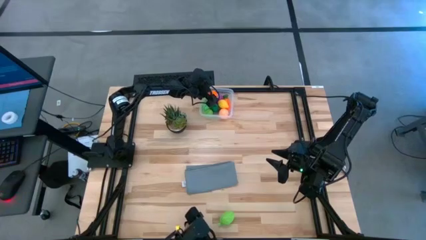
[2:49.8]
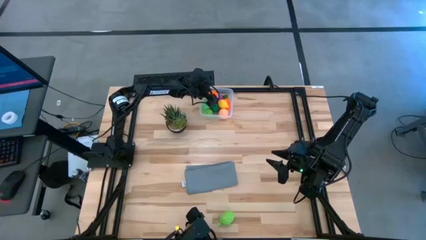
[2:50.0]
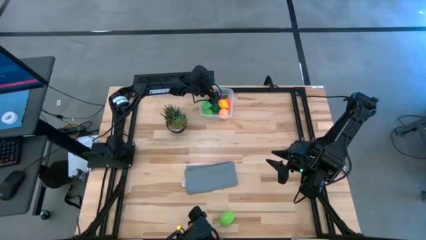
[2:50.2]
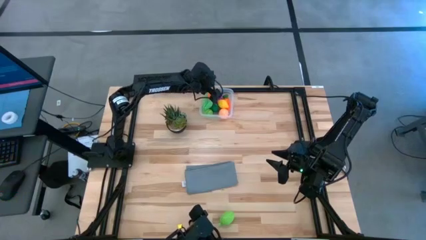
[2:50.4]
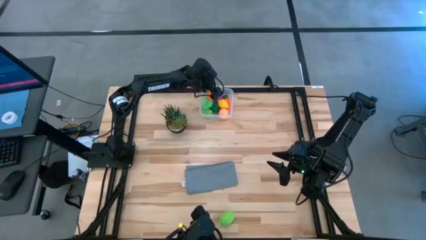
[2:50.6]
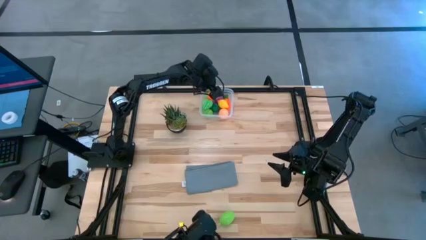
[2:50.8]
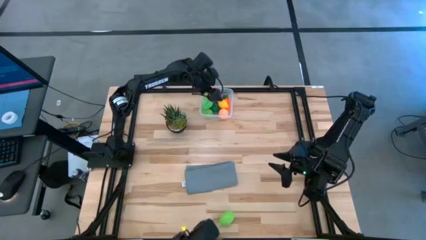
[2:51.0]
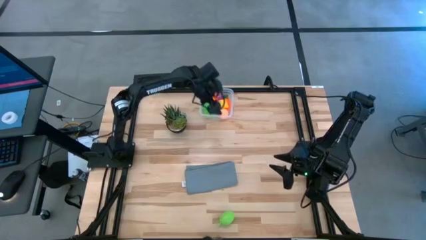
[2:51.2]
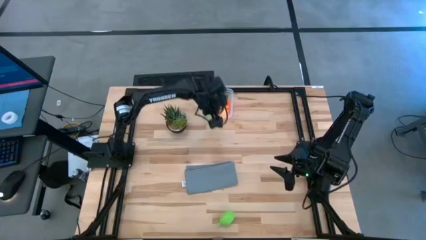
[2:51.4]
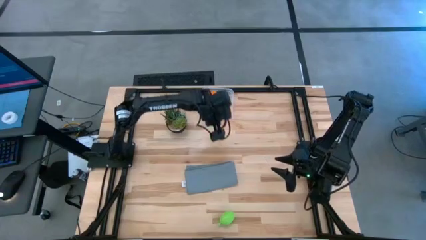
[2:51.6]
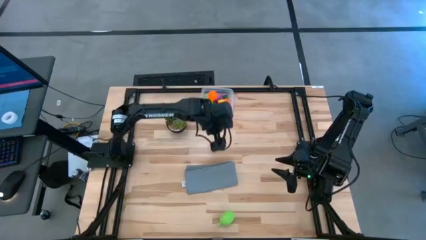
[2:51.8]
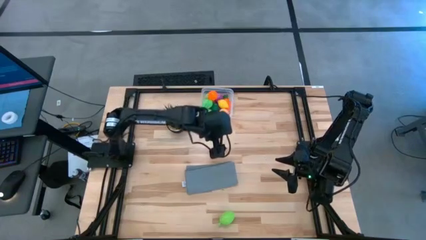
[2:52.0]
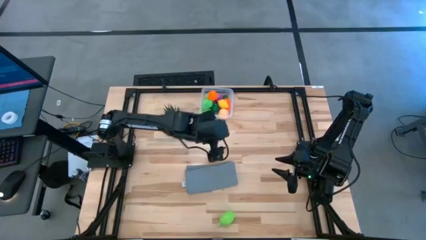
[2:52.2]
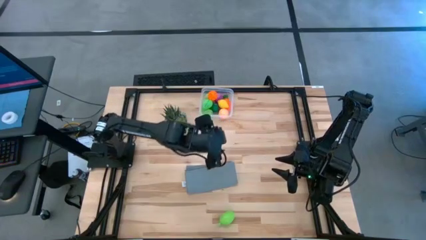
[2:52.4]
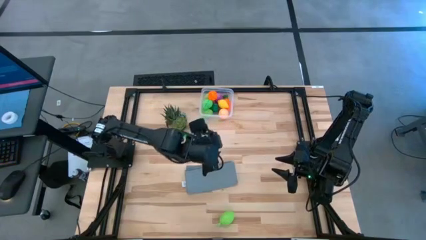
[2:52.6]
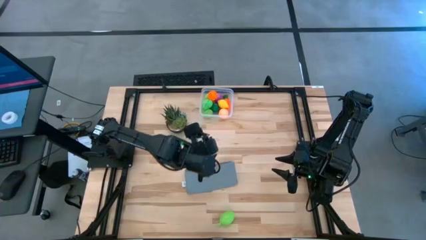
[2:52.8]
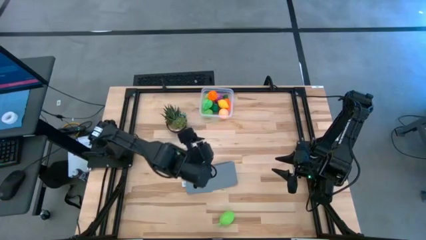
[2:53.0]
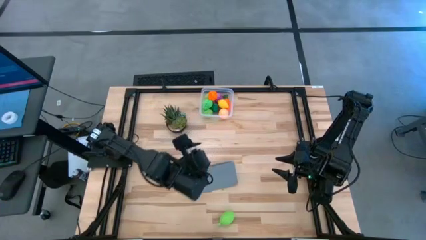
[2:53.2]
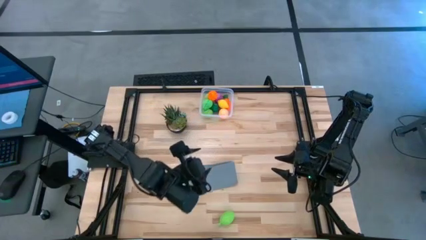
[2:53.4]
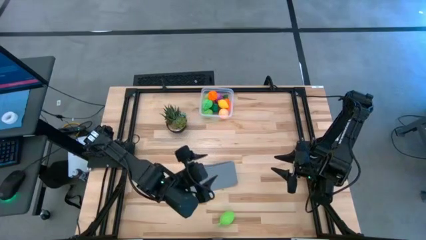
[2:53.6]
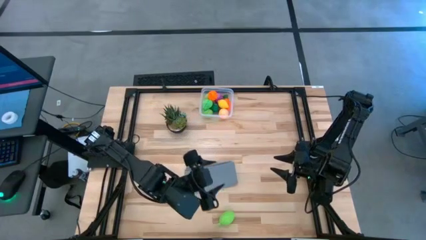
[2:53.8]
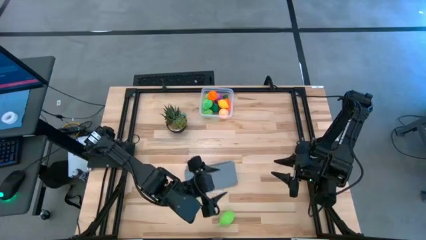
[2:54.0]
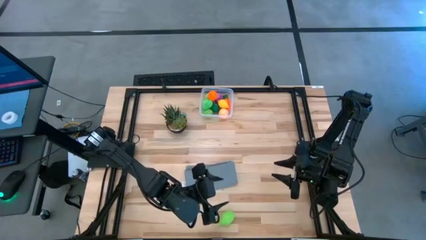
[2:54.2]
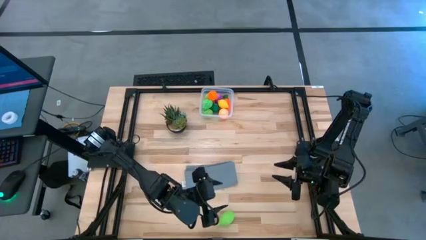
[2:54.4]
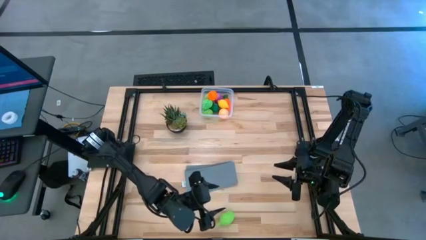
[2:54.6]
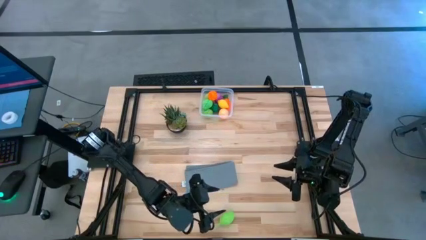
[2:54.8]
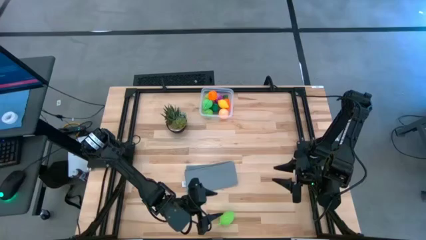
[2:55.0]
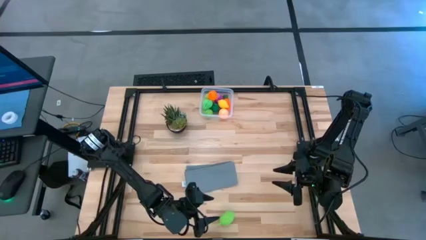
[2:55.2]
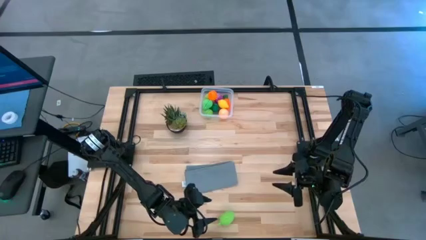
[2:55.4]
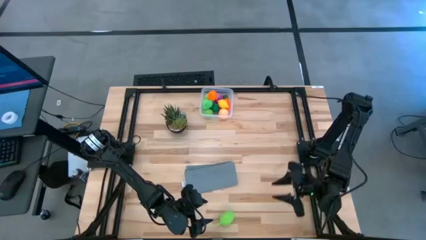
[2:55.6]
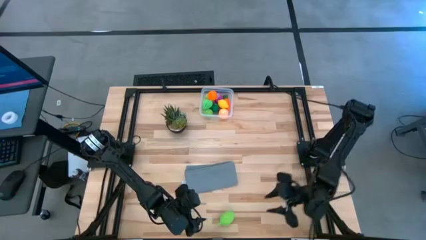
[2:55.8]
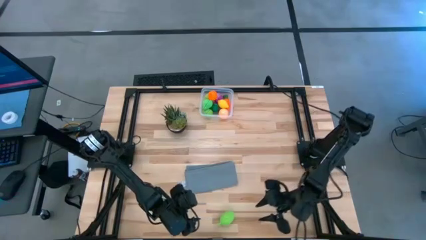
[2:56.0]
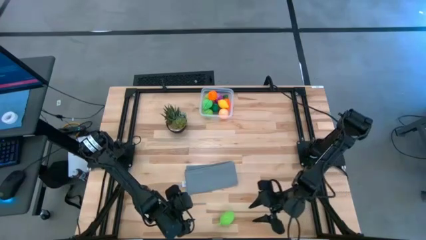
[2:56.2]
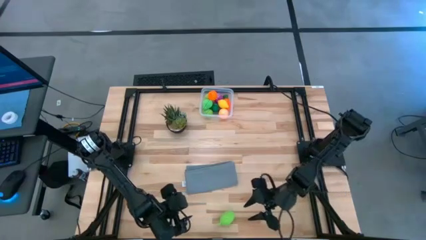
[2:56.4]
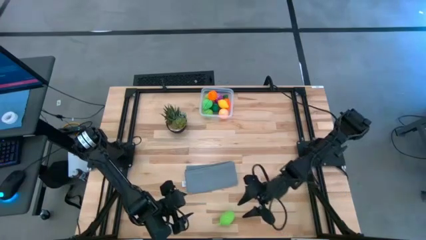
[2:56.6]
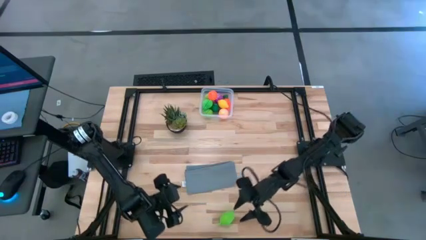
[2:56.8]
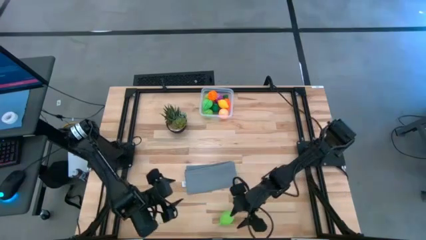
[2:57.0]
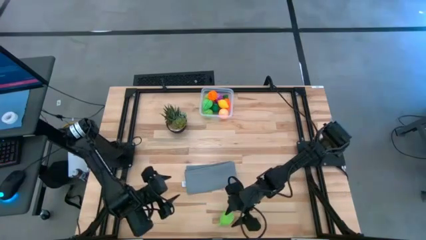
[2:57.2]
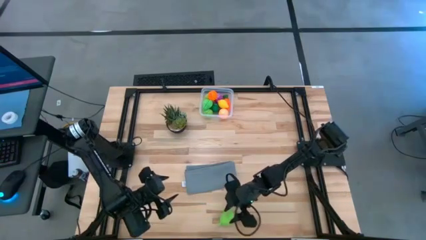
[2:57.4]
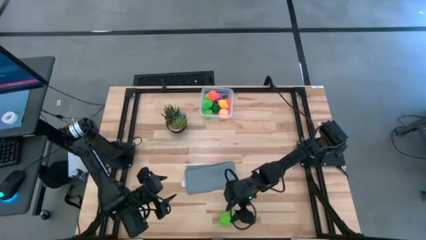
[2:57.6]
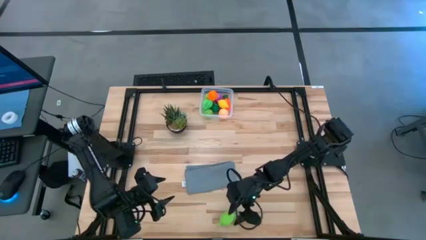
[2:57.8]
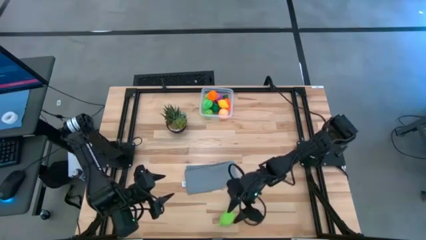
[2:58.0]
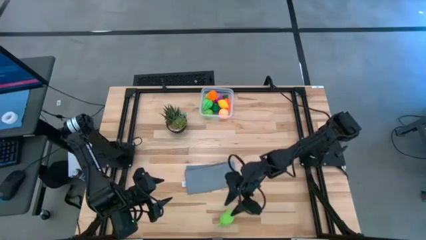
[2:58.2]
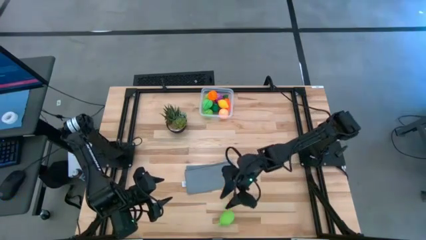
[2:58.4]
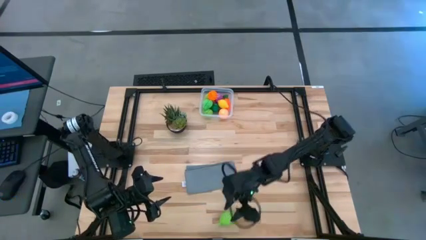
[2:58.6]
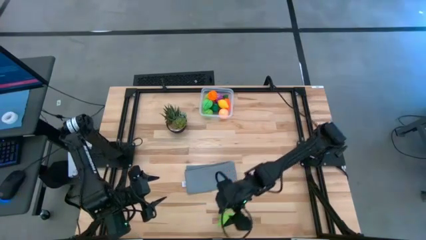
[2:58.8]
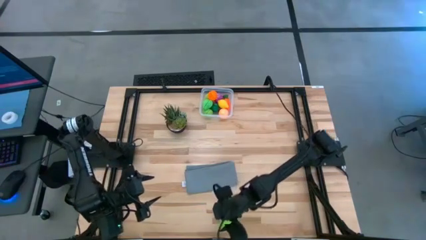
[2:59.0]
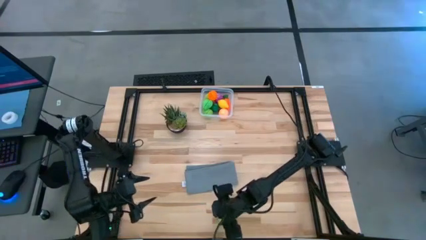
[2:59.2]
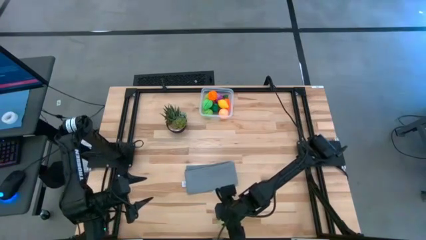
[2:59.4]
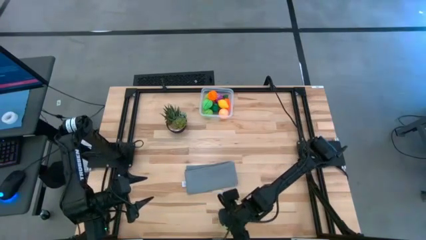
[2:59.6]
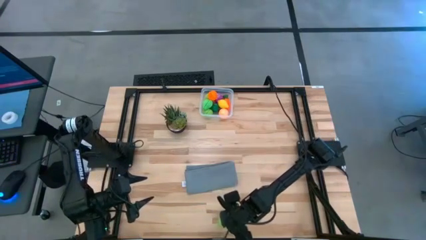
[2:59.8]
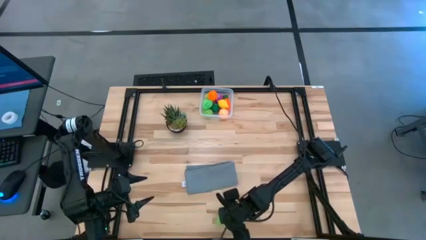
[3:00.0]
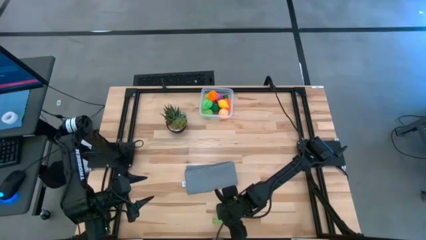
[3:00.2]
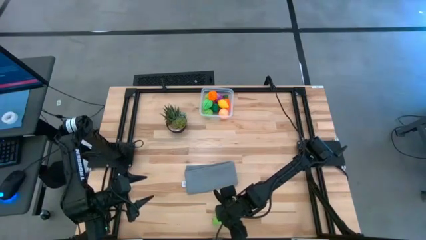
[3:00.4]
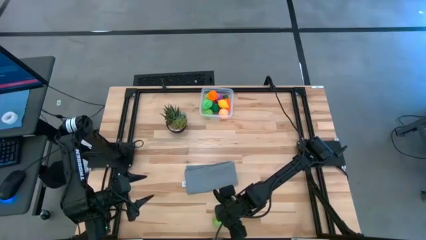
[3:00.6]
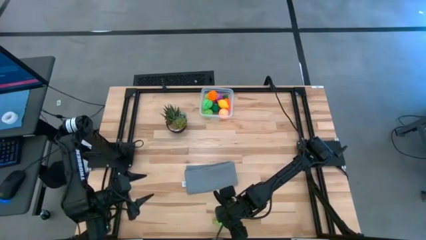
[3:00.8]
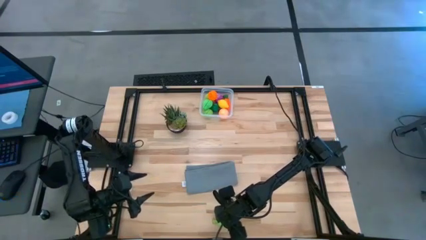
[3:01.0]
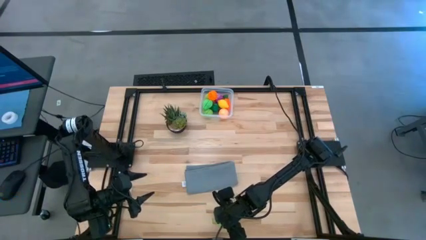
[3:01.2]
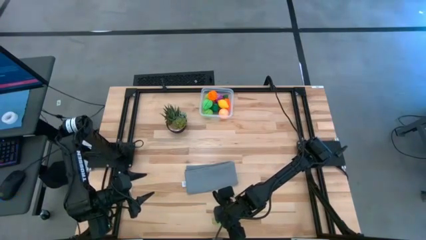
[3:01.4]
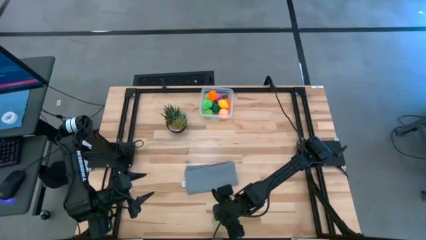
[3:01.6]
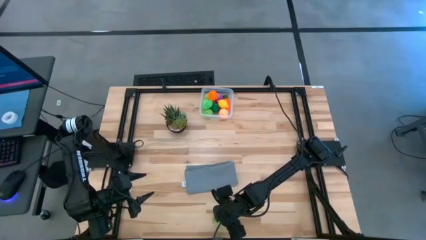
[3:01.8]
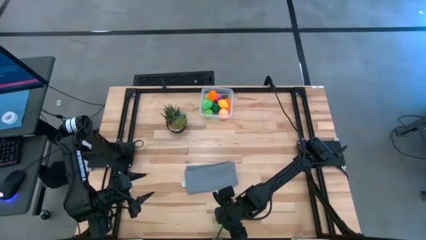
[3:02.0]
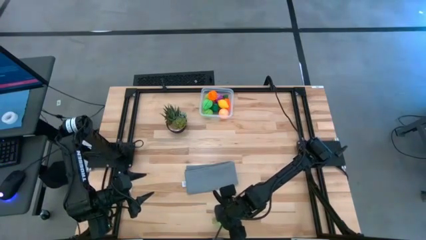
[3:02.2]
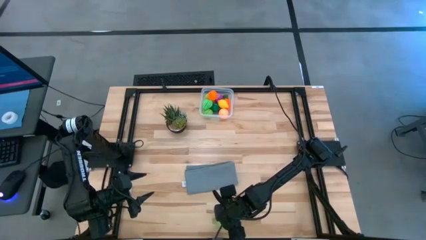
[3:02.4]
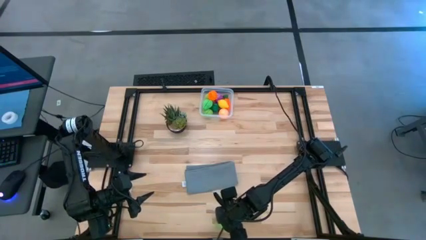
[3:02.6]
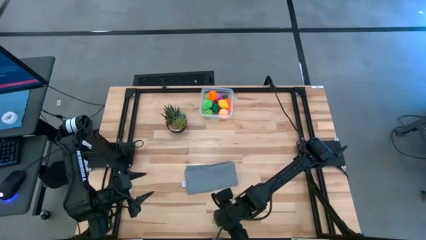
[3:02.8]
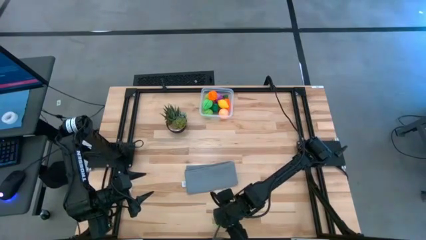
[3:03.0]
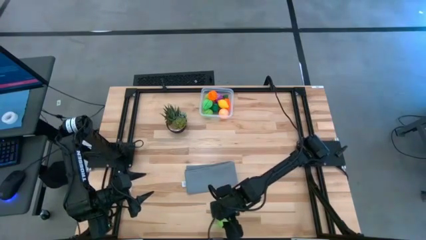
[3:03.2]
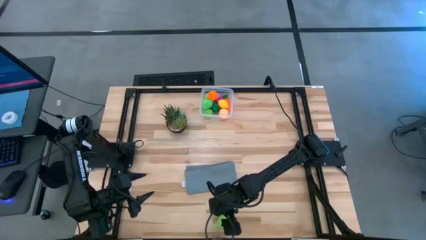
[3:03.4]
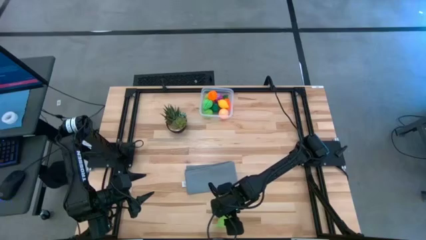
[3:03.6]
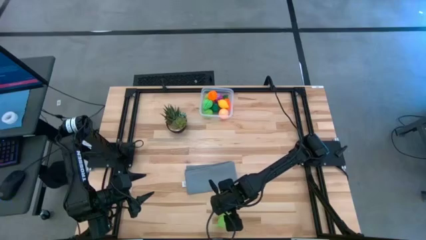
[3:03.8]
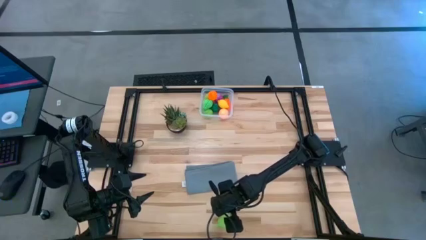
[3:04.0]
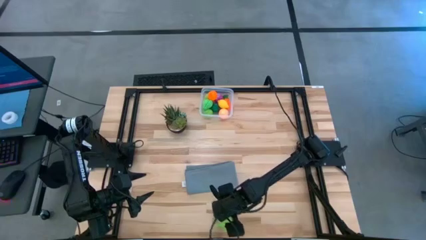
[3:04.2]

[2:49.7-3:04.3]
Task: Pick and placing Produce into tupperware
Put the melon into the bin

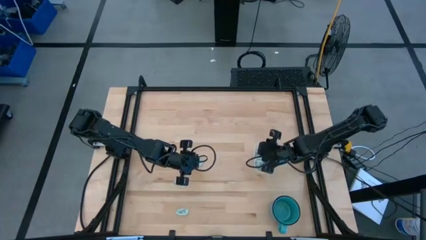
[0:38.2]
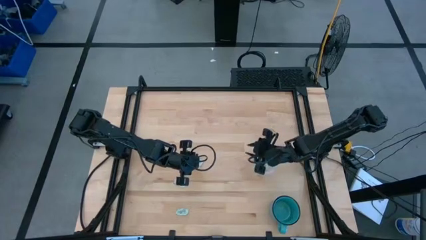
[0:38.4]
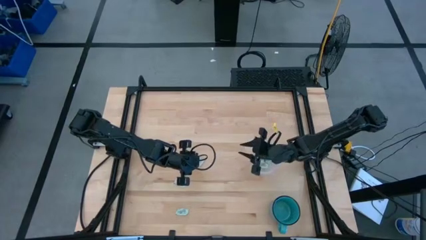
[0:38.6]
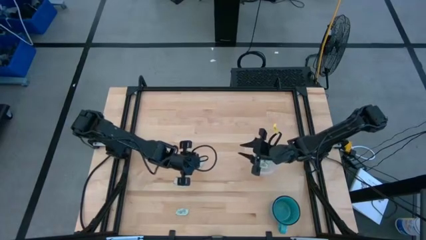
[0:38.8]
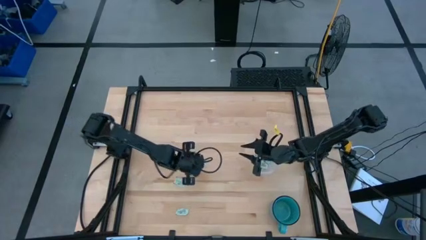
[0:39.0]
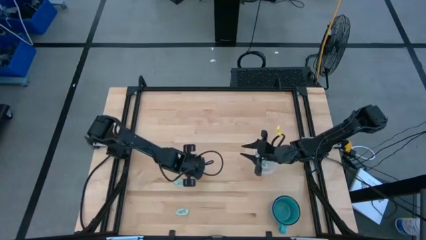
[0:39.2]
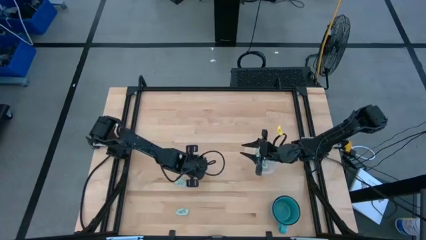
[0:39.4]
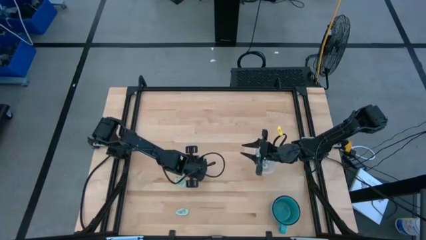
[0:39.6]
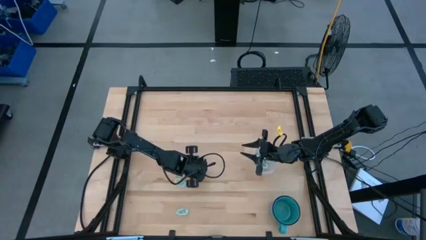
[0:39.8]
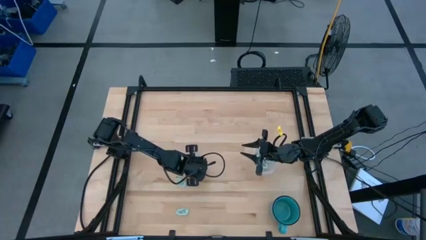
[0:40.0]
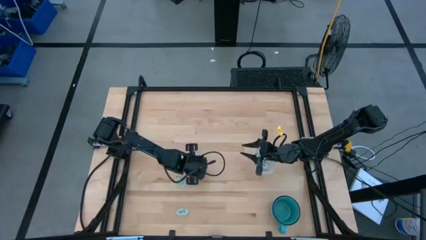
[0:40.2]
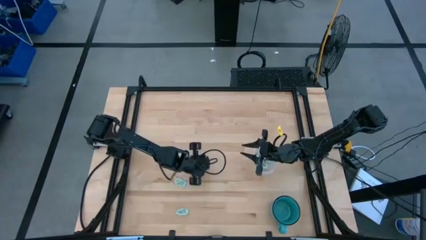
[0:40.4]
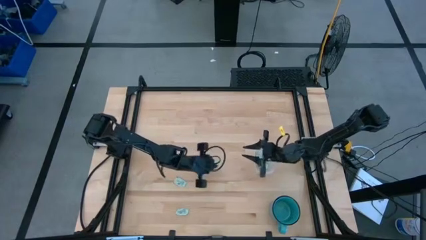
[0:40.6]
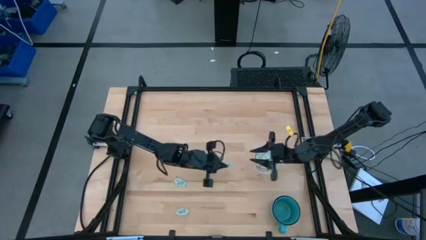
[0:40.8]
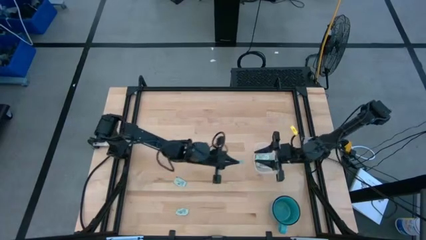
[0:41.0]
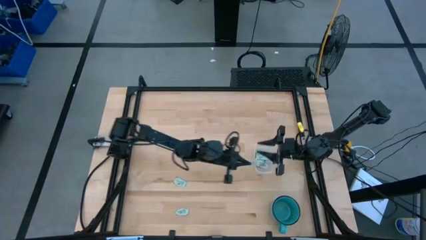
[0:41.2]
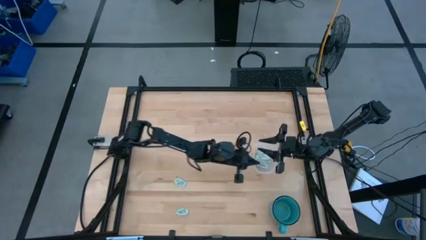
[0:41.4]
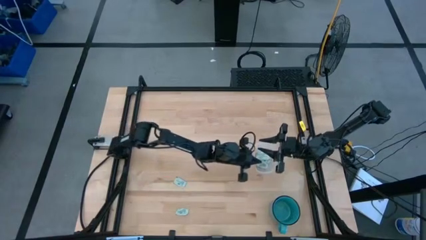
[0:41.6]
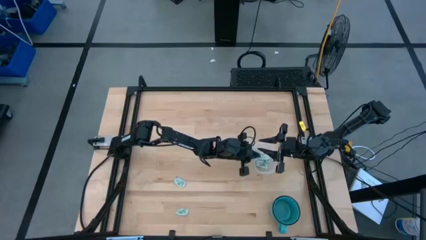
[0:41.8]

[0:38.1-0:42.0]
Task: Pick and place Stevia / Truvia into bins
Put the stevia packet into the bin
